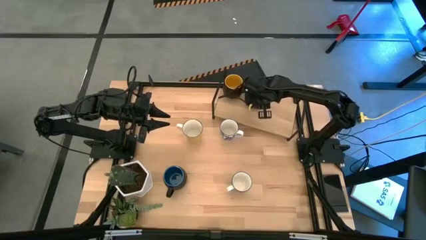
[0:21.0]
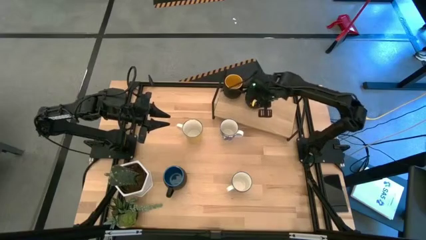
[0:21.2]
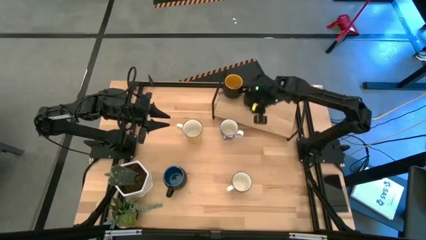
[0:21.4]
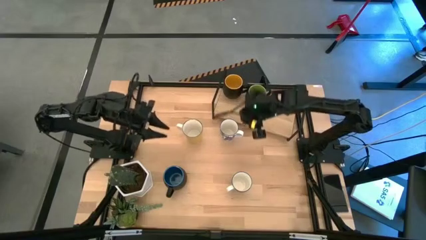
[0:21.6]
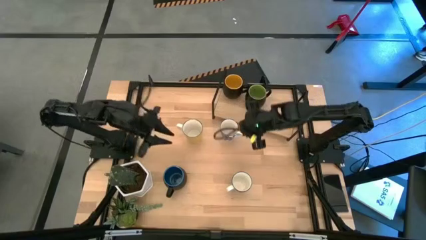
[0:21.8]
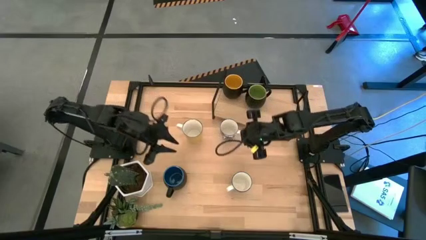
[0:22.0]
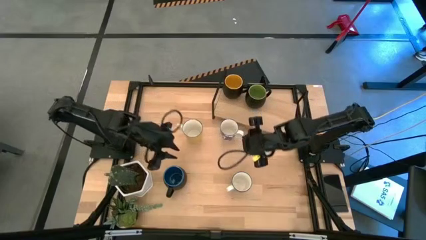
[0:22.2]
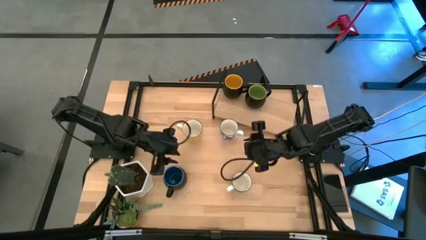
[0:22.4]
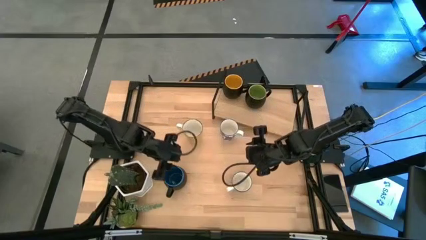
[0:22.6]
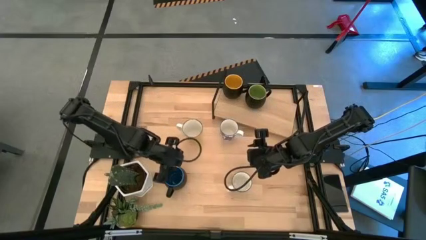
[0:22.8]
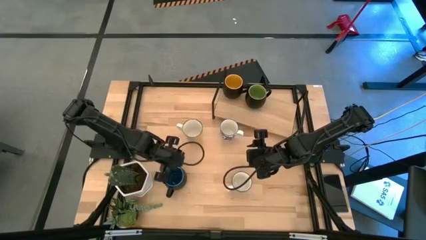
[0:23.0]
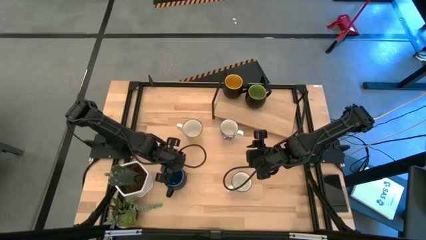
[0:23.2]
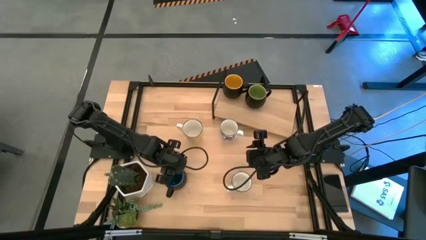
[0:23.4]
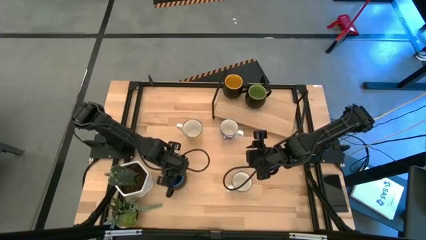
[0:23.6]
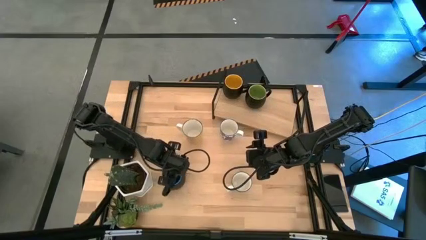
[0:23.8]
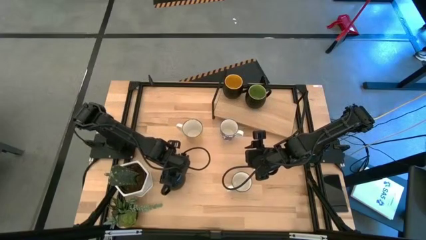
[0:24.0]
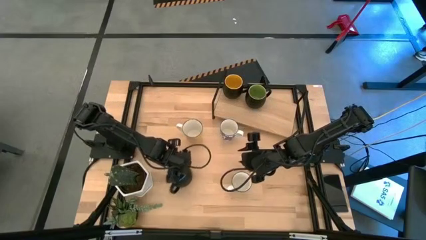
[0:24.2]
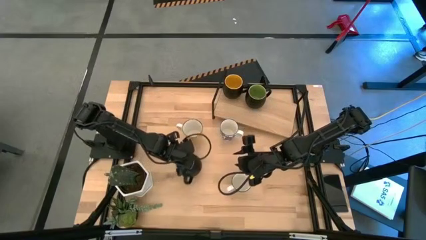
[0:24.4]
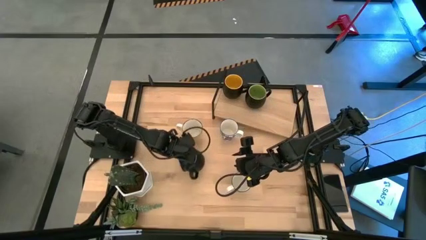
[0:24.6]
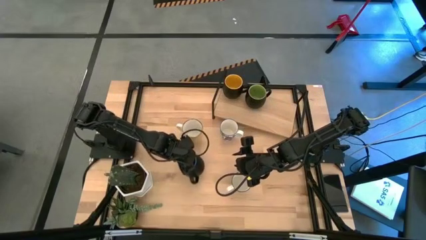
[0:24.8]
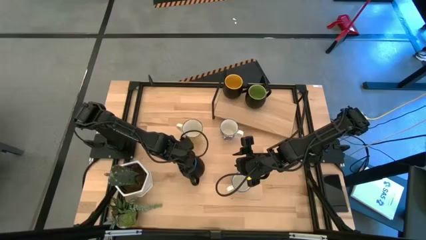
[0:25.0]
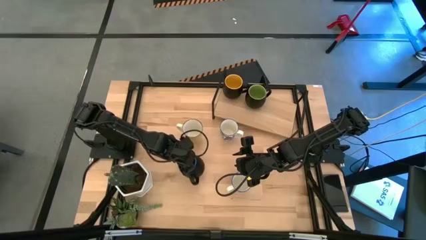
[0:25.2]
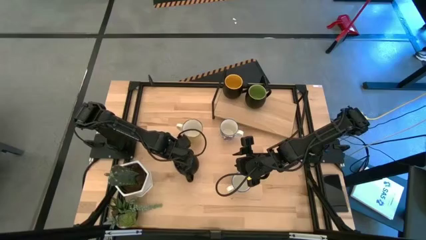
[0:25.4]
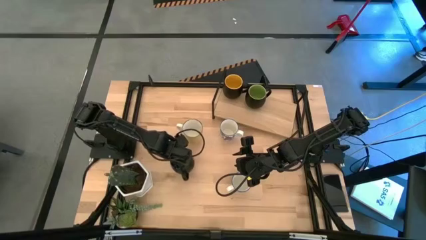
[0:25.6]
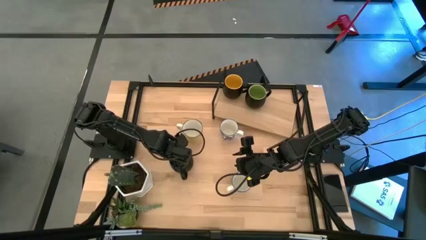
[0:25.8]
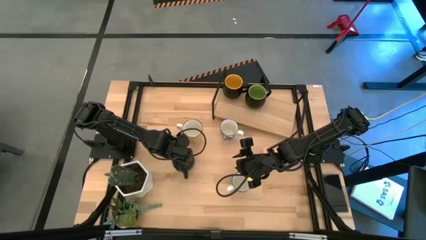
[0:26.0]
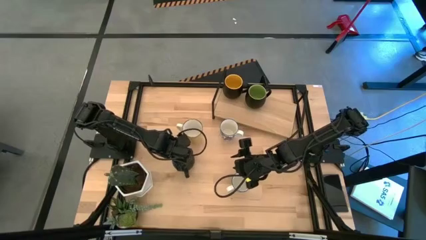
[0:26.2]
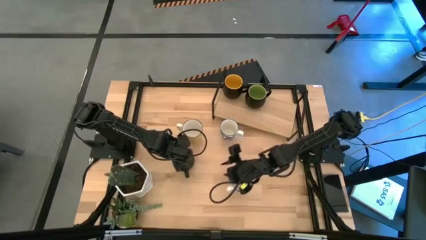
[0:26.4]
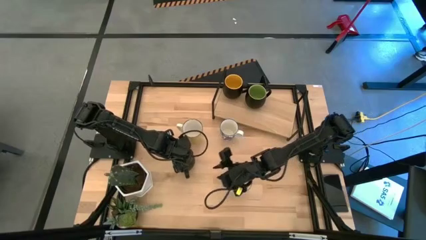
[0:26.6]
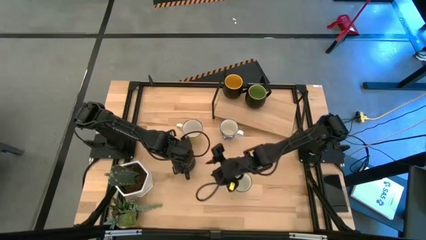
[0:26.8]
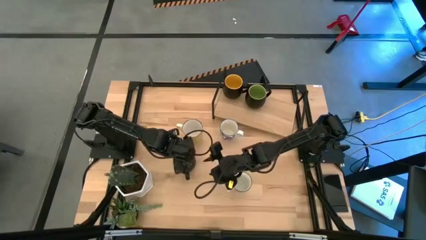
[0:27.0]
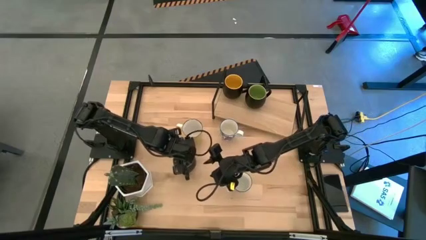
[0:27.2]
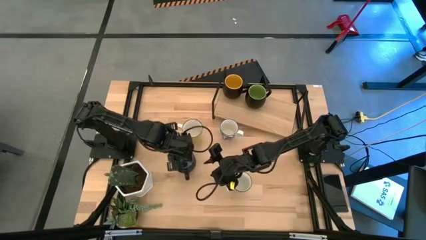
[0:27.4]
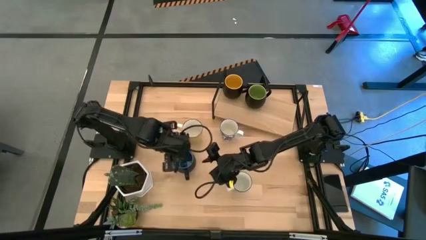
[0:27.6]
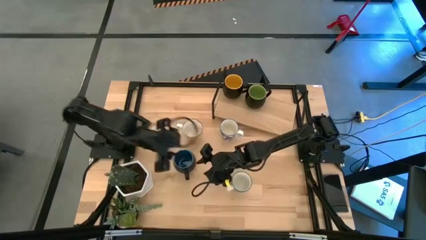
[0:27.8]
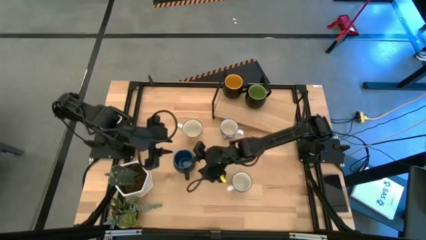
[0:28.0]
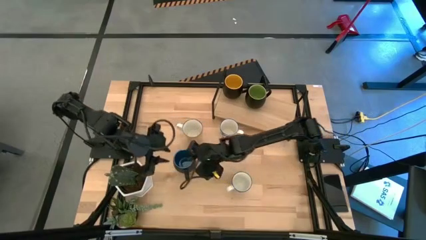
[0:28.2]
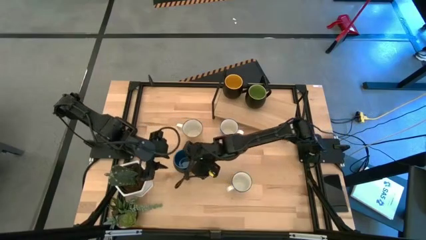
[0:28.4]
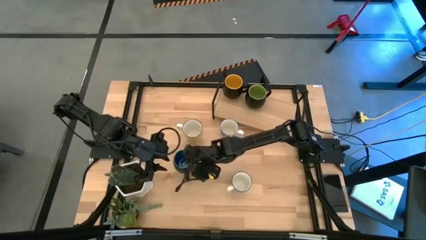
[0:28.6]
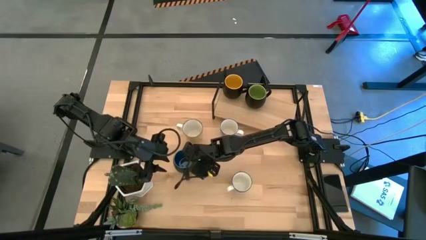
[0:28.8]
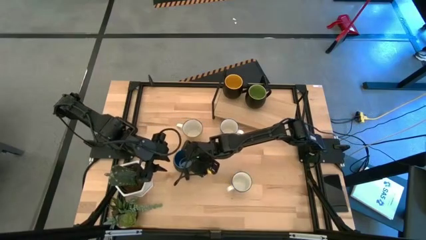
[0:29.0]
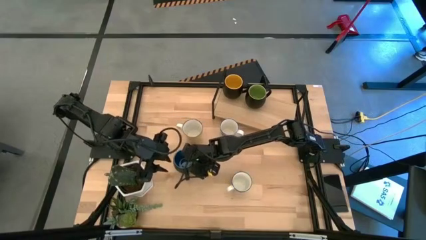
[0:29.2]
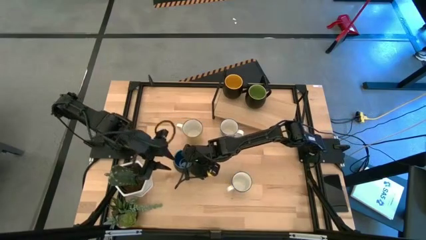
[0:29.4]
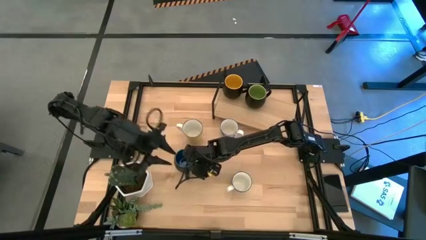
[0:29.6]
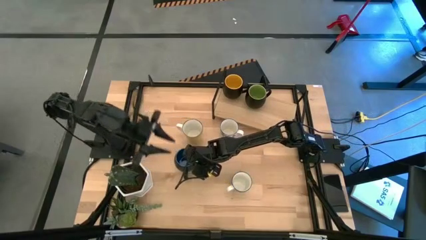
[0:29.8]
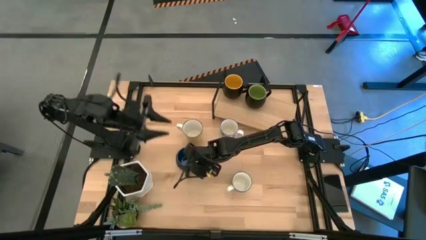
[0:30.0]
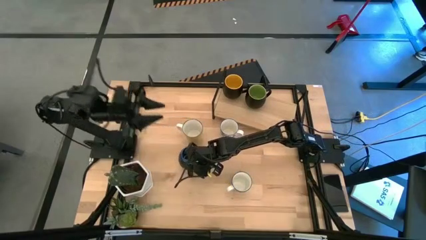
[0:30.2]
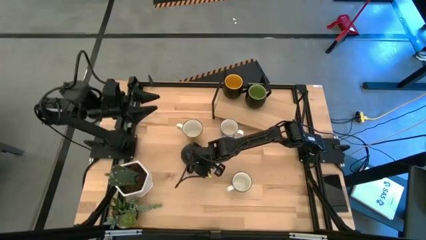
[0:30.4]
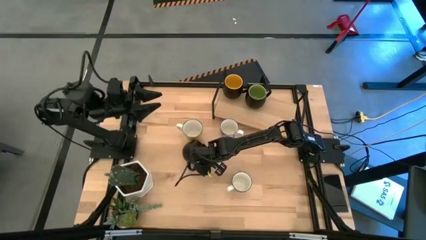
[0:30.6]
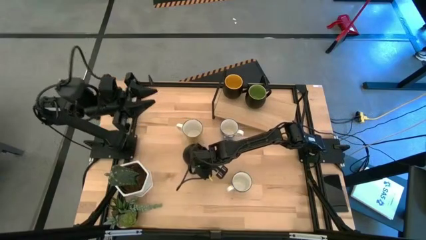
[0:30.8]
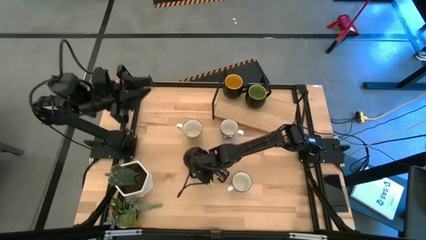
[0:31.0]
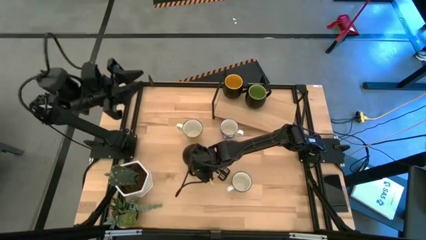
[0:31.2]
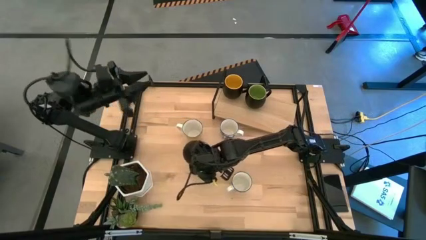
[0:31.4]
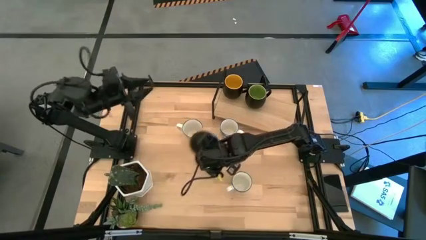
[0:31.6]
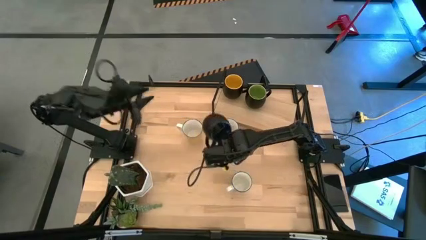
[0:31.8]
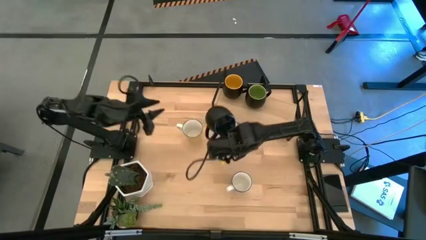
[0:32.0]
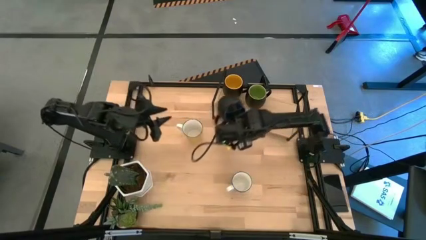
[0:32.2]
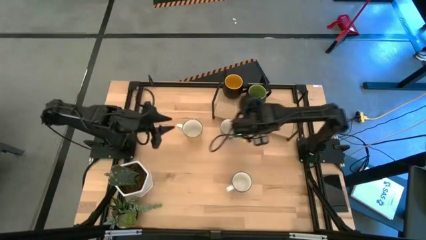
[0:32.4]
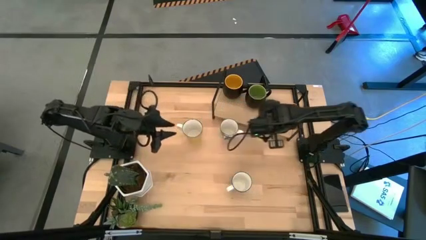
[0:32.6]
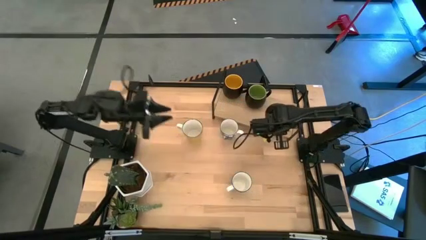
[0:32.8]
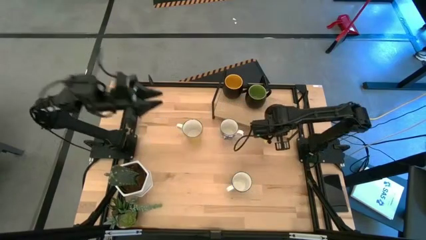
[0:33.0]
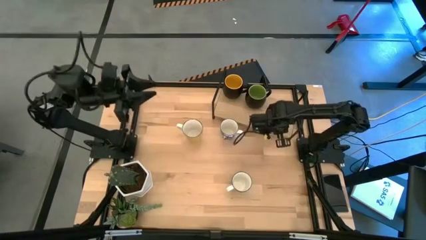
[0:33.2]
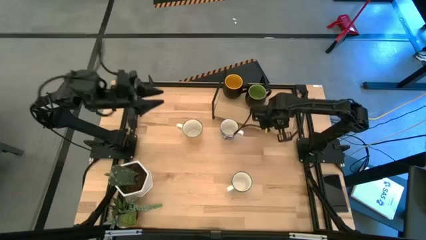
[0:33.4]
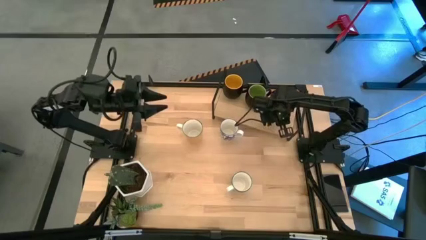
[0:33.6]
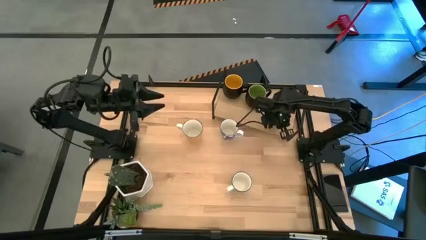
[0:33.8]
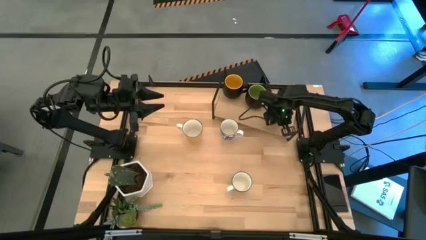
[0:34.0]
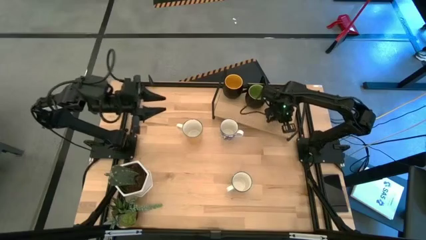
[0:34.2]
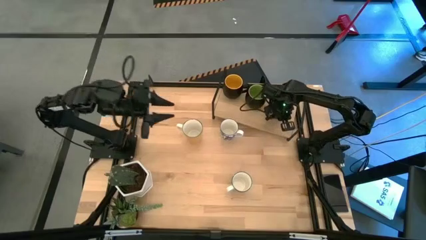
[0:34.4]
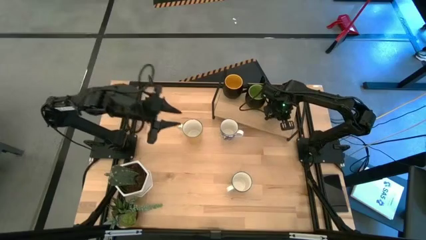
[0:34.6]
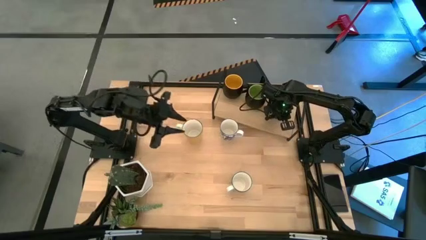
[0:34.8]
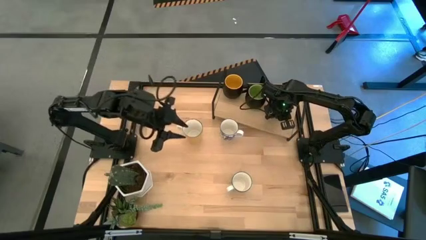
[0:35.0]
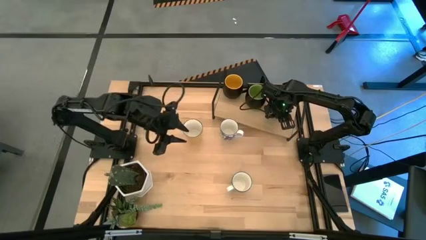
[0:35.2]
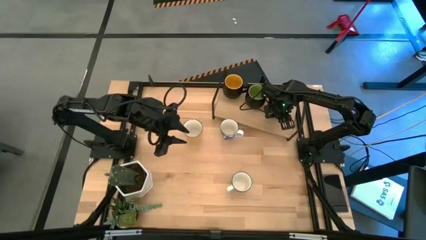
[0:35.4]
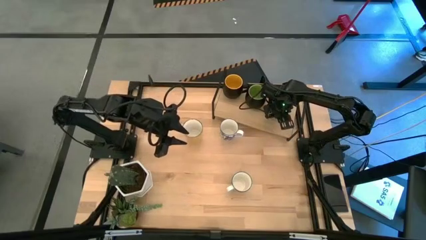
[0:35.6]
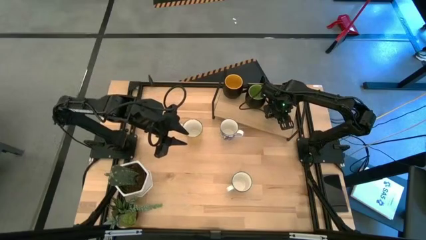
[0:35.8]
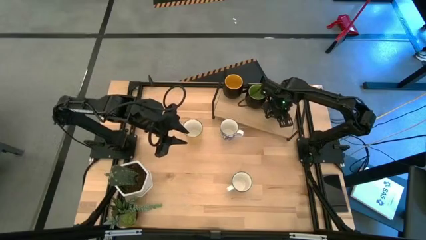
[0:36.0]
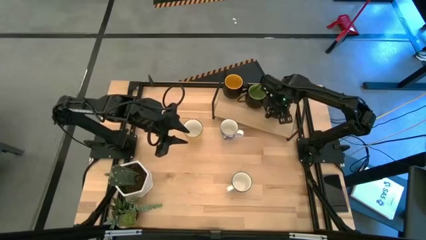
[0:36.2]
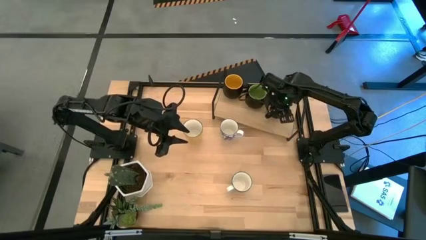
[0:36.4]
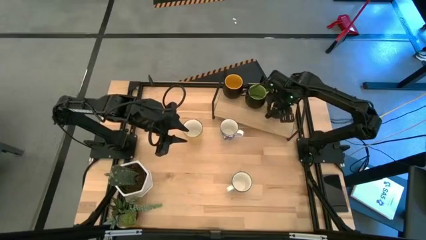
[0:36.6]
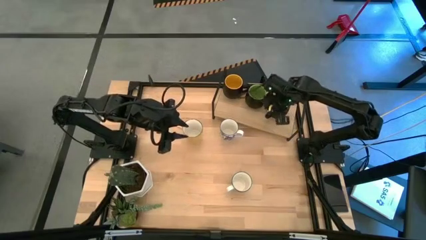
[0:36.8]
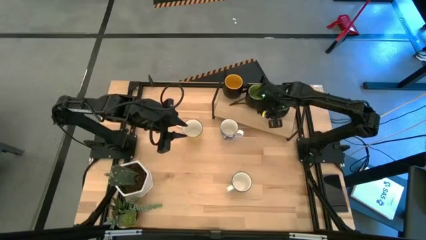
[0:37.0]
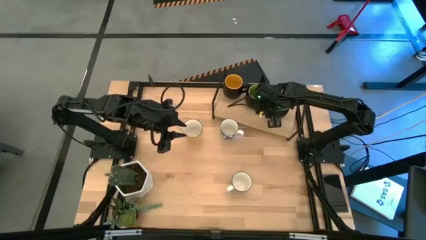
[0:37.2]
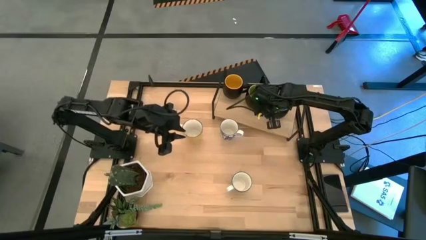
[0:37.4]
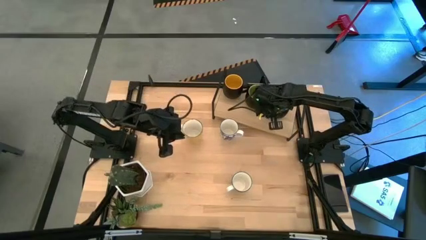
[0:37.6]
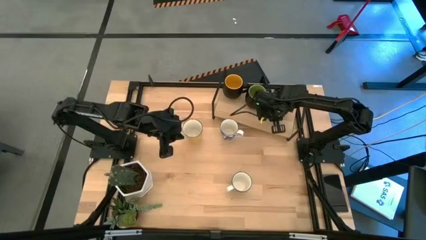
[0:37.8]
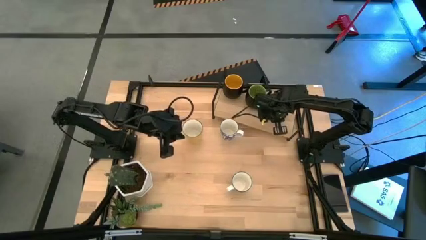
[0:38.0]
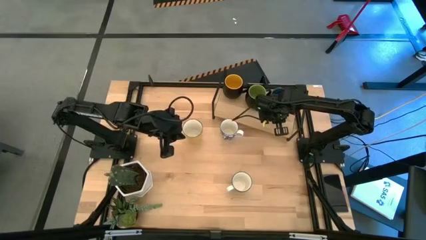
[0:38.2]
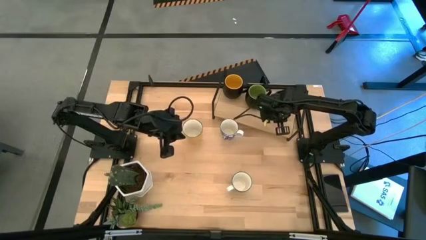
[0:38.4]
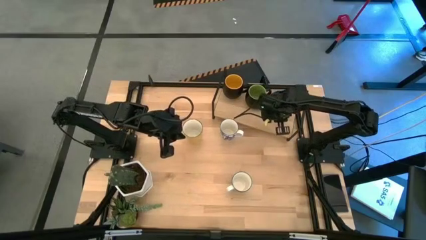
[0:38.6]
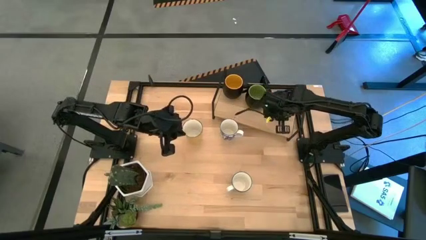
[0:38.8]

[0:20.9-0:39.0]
Task: Place coffee mugs
Put the black-blue mug on the shelf
